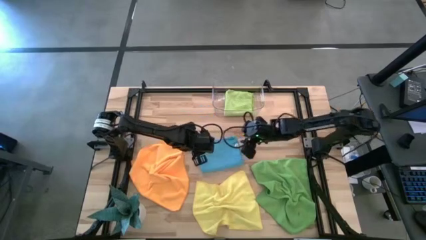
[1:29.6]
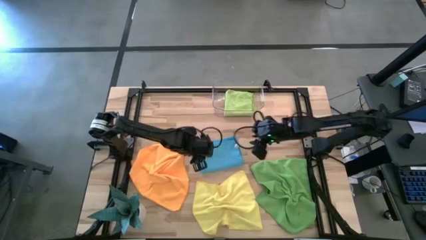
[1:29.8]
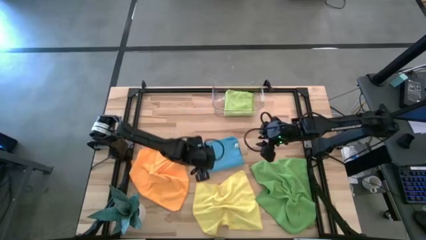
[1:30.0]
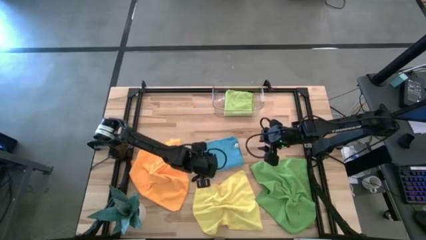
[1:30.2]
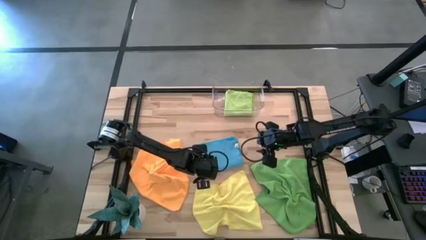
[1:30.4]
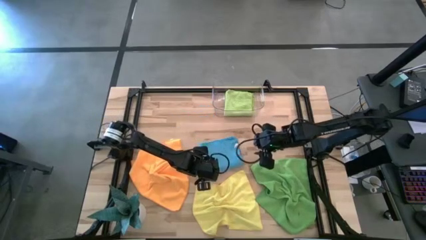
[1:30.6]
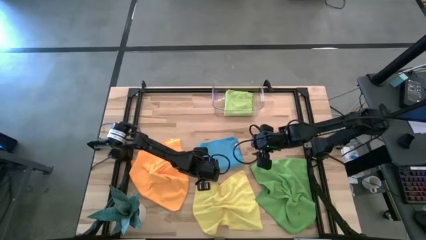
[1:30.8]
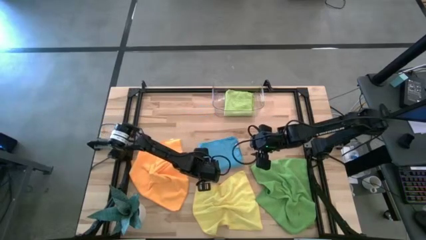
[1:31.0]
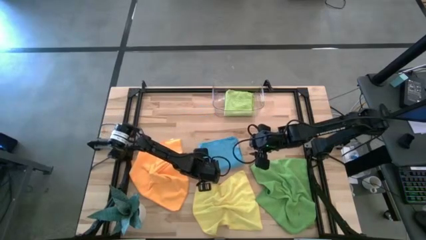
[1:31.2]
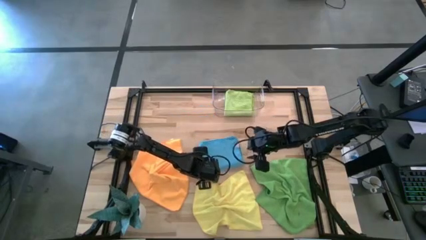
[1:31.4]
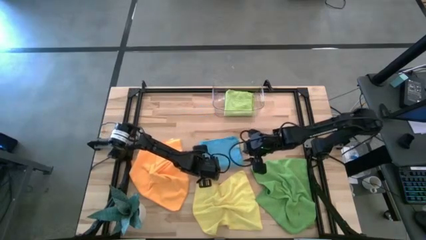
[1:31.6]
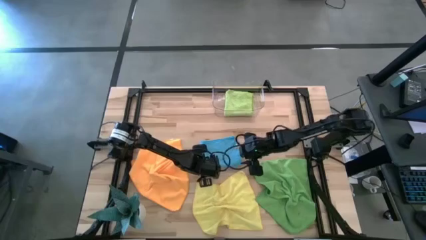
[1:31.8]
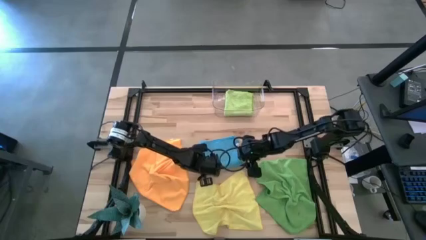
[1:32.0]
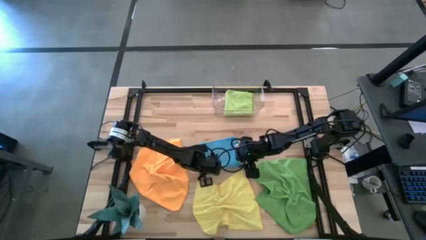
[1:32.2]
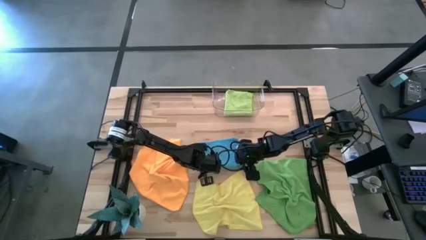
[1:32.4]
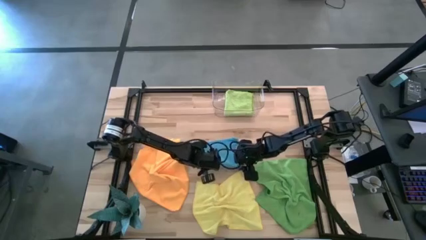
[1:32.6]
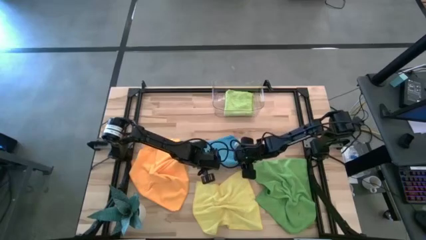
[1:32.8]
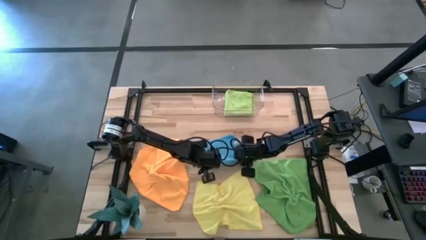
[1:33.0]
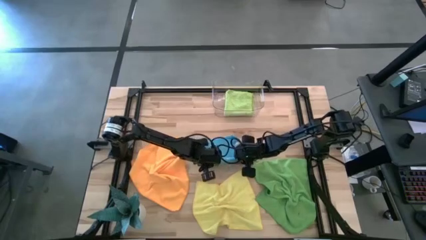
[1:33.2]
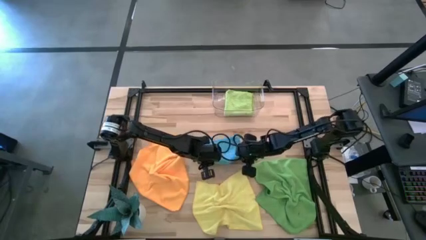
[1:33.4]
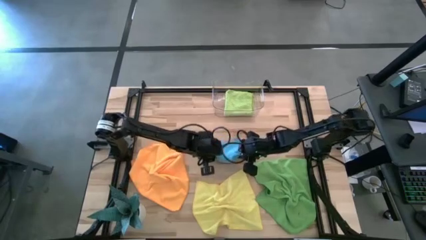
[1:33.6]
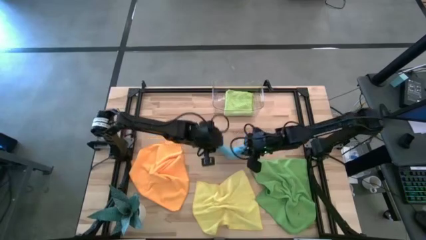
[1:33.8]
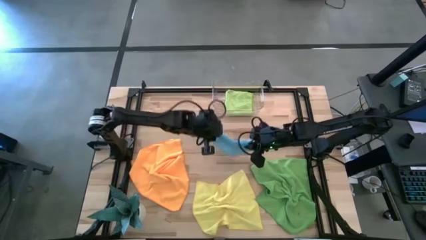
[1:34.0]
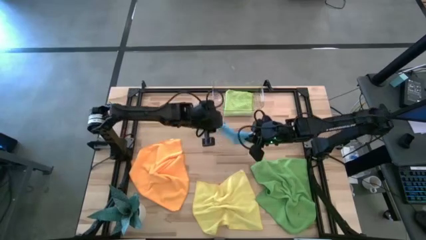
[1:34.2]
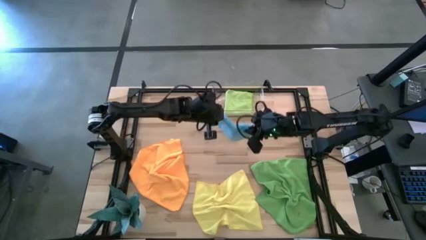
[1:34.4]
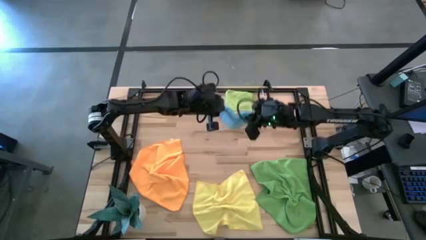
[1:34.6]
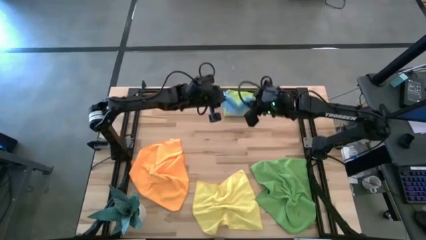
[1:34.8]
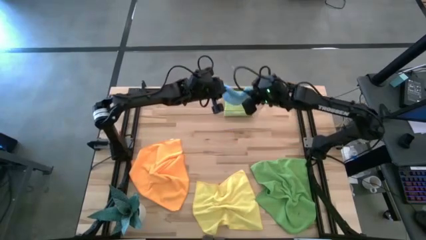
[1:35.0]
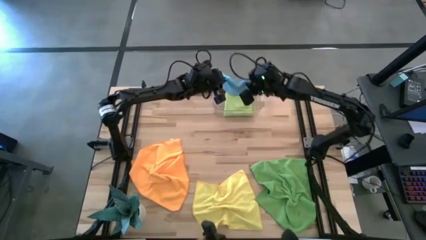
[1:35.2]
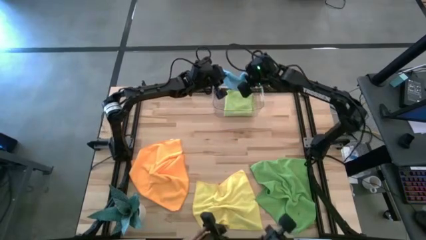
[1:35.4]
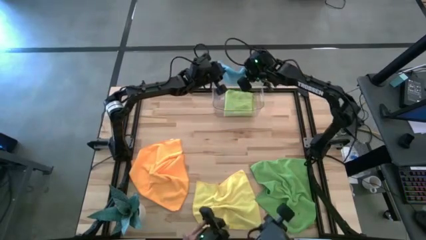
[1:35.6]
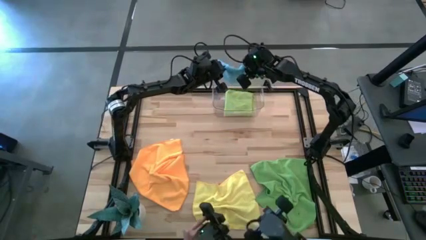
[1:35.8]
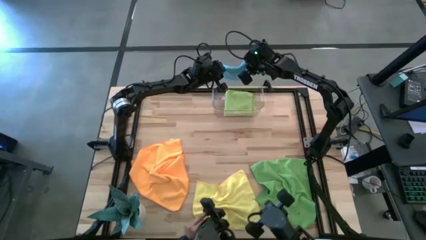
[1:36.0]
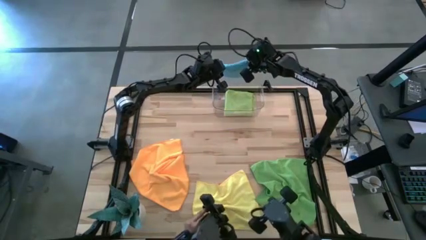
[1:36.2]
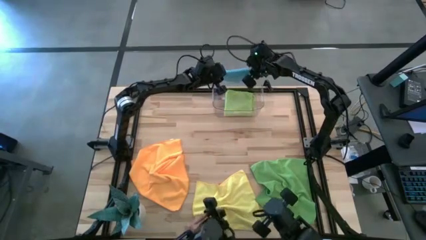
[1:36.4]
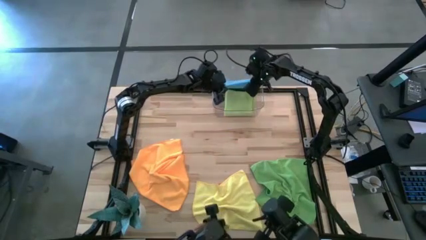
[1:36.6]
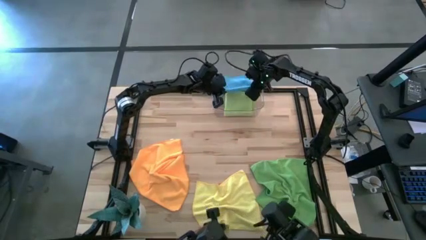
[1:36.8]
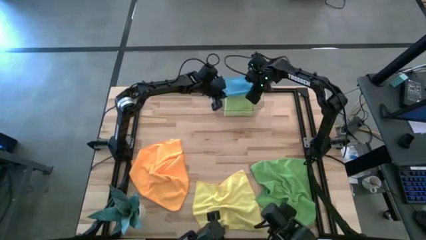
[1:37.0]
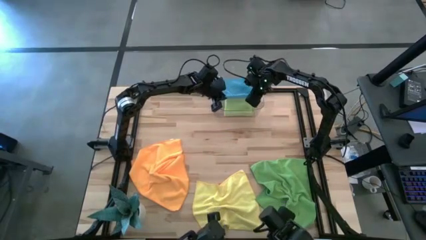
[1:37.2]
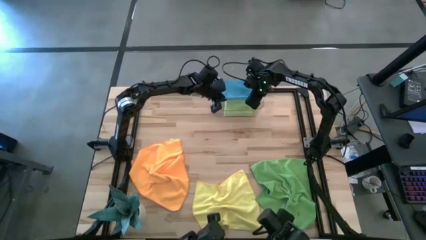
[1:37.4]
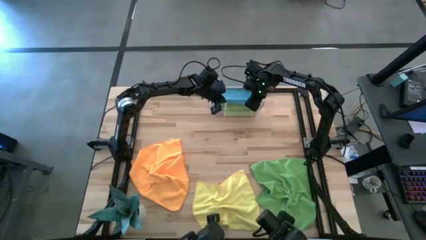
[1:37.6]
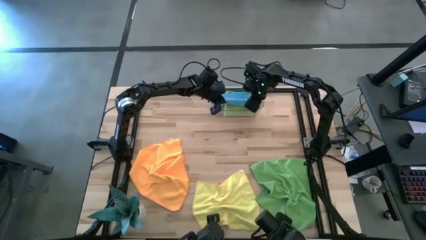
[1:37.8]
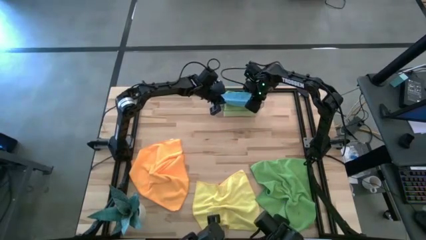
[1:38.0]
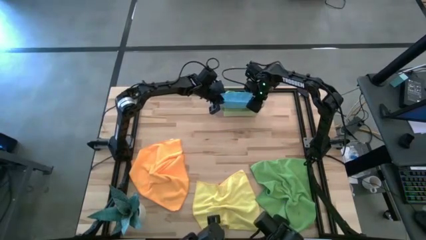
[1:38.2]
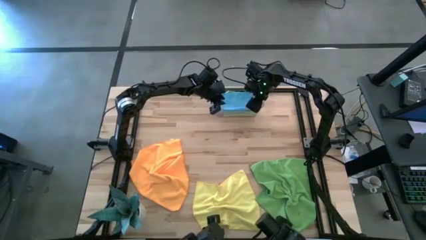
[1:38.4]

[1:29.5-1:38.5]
Task: Fold microfiber towels
Stack the blue microfiber cloth on top of the light green microfiber cloth in the transparent bin

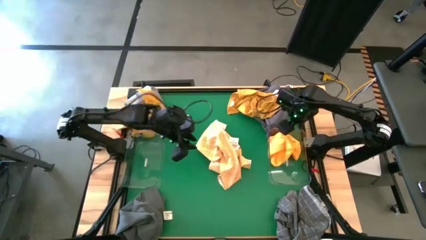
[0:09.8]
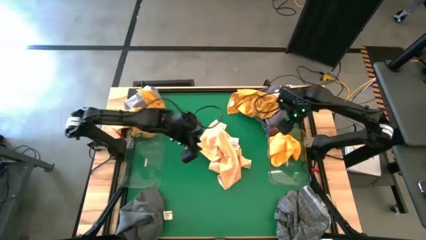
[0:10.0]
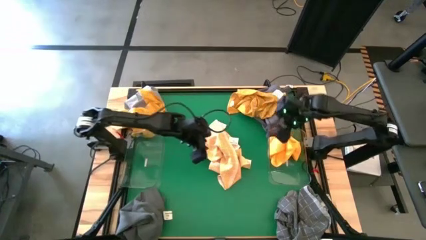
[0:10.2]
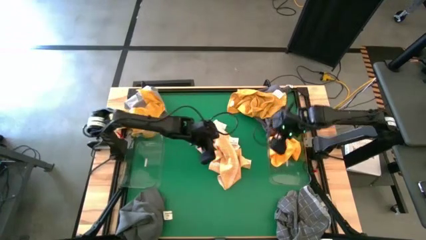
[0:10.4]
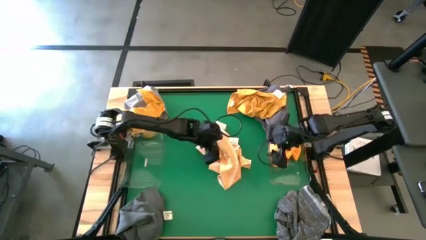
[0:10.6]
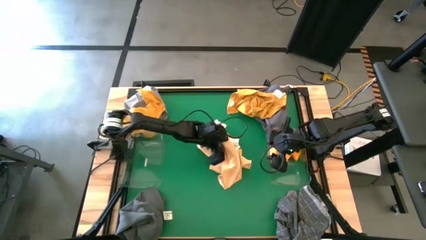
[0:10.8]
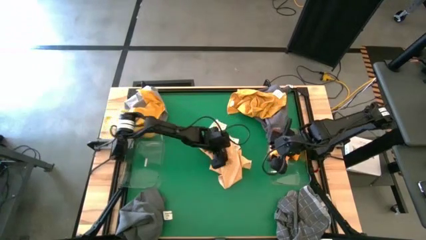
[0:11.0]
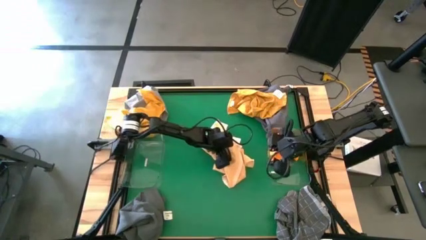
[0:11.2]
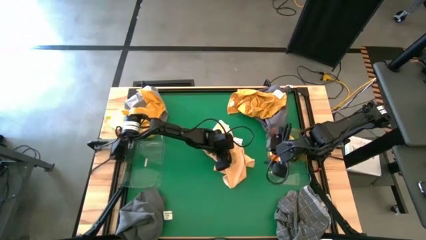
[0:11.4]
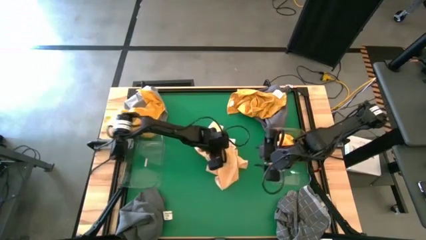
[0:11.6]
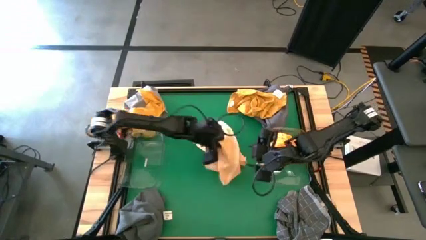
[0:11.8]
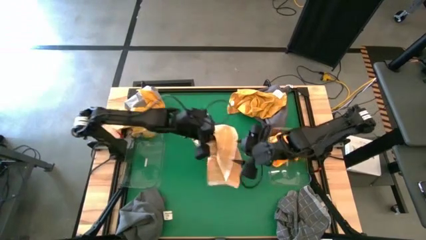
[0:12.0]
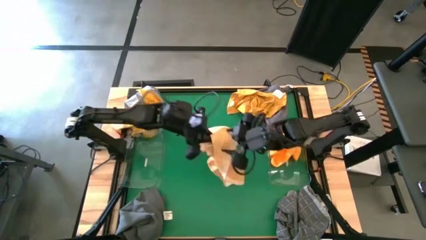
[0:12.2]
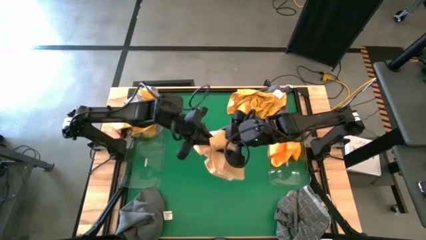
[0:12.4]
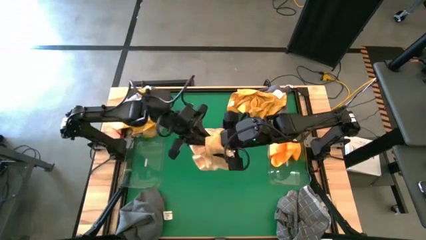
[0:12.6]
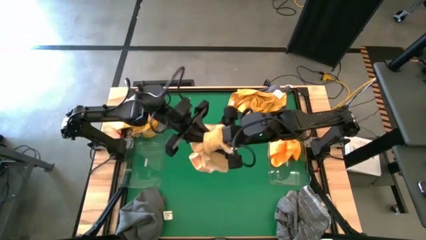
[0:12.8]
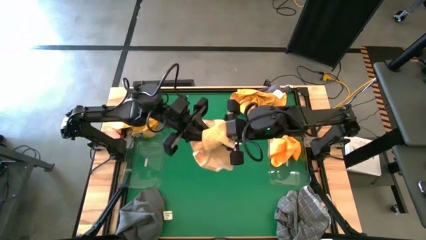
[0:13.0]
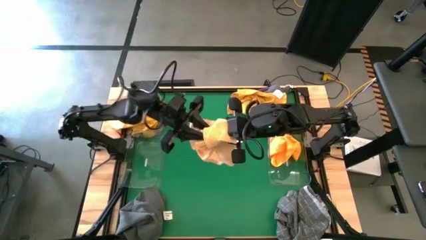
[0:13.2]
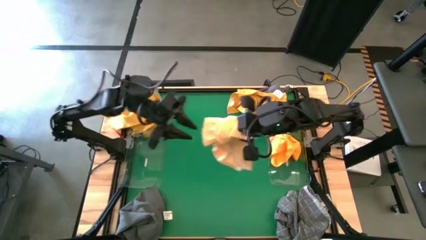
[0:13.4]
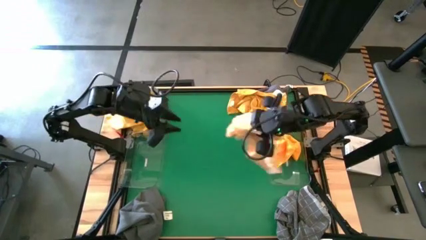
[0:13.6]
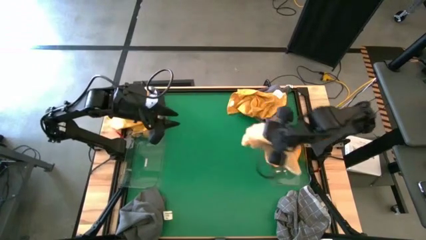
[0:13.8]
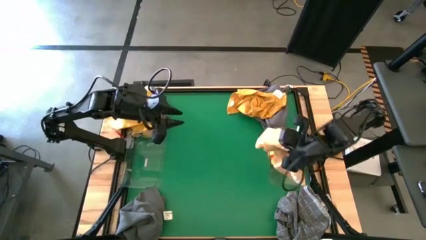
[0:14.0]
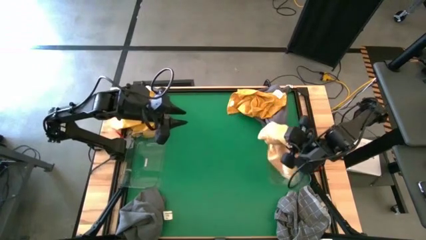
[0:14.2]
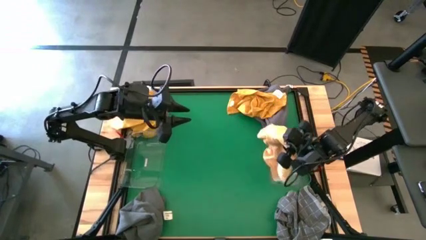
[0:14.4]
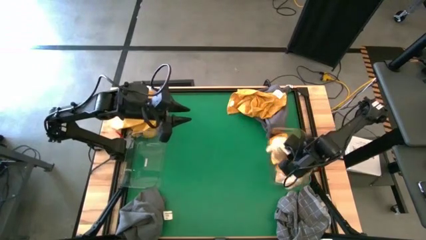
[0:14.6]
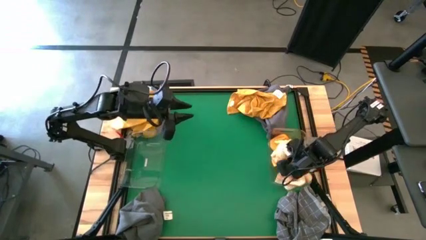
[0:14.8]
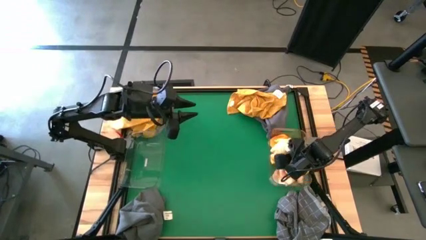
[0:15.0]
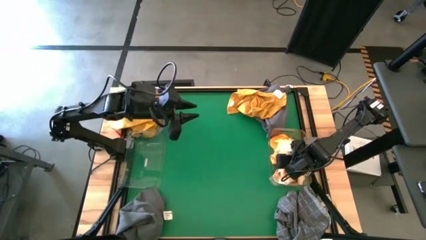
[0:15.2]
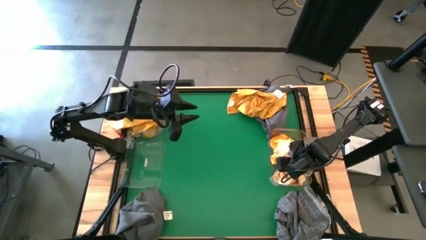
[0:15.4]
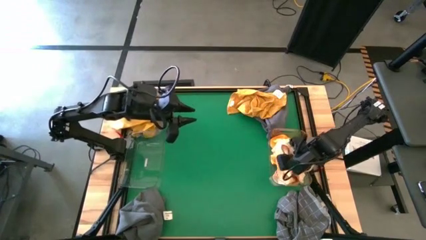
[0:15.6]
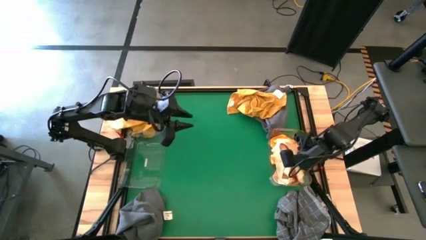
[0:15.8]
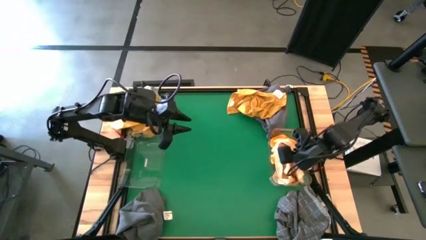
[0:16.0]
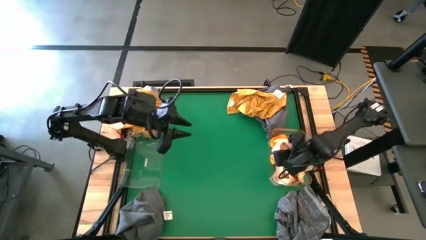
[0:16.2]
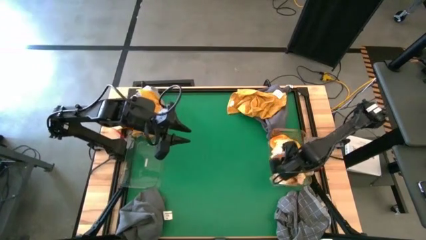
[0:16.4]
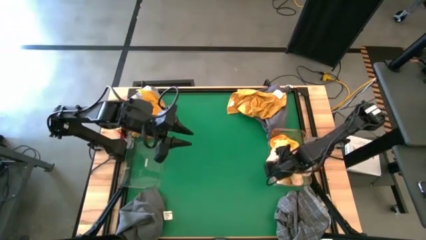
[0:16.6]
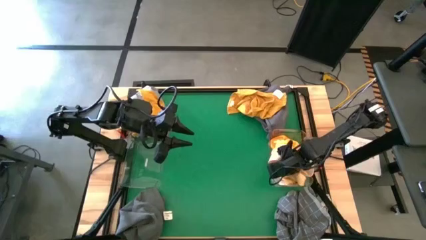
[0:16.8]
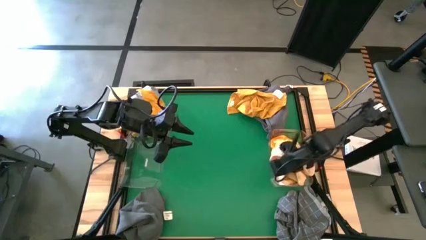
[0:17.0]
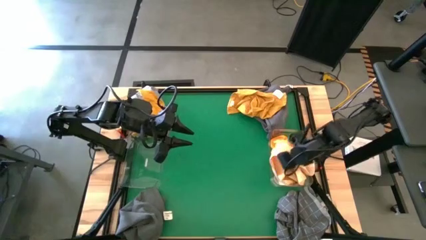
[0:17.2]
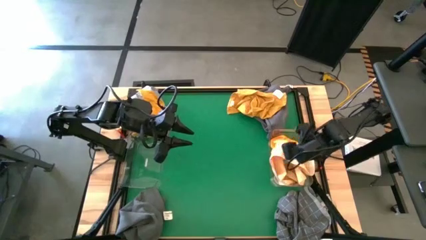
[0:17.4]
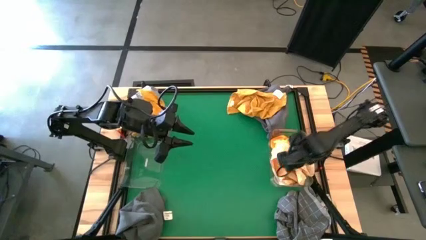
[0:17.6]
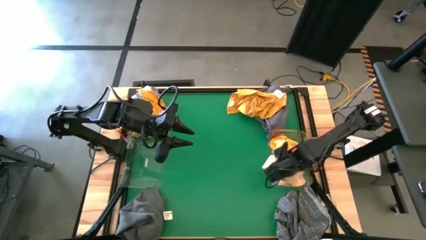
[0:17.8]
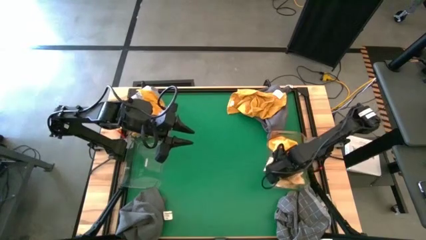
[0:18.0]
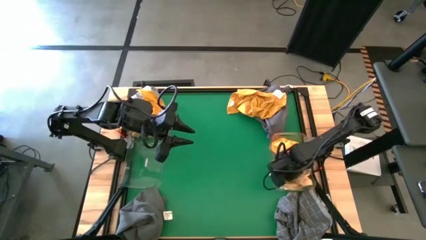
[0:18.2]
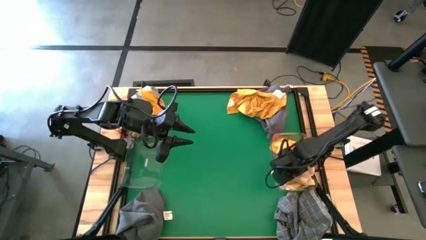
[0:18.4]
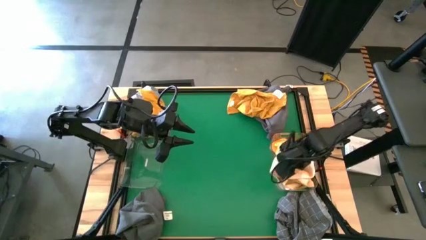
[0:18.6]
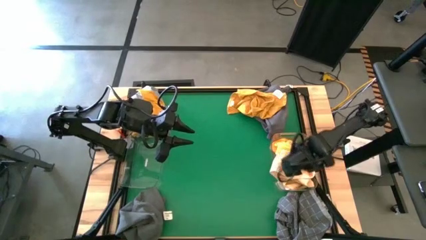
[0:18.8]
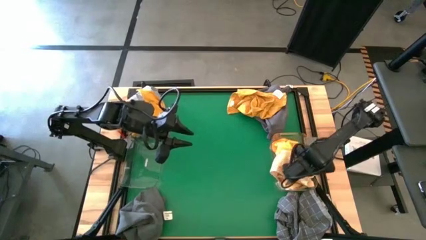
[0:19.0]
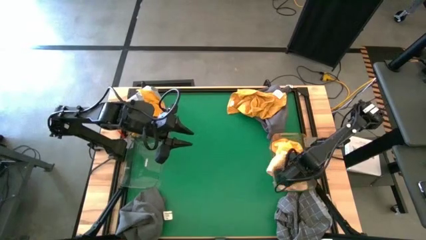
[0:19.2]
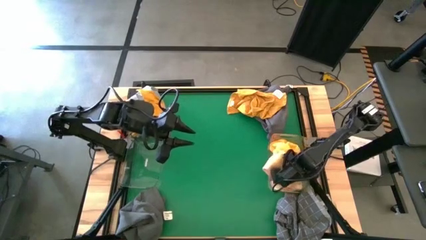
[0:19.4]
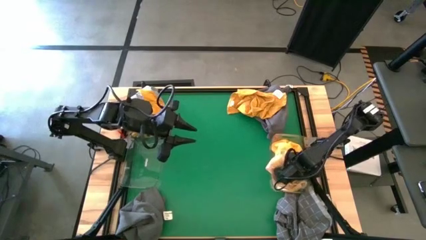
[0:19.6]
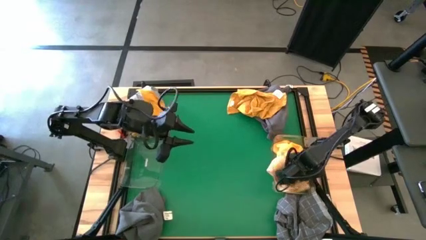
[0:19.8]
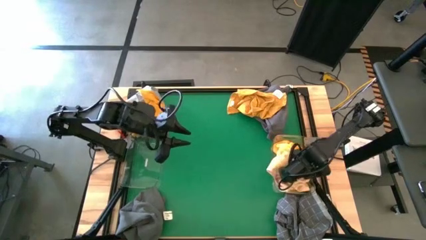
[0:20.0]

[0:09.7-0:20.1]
Task: Sort microfiber towel by color & place in baskets
Put the orange patterned microfiber towel into the right transparent bin
